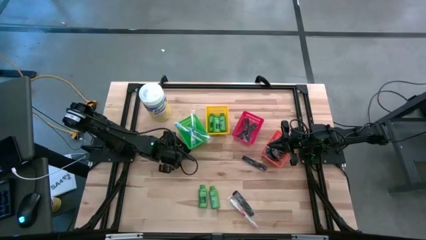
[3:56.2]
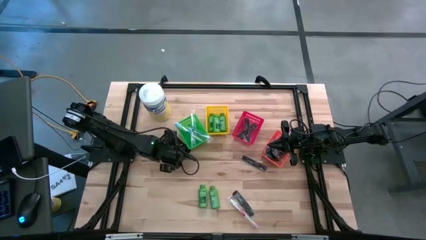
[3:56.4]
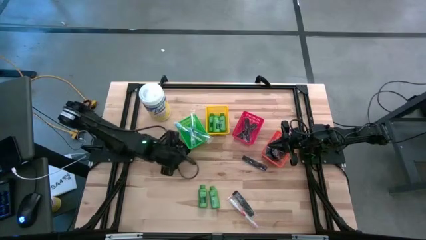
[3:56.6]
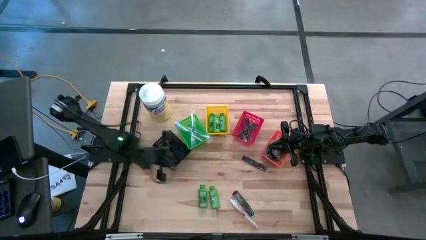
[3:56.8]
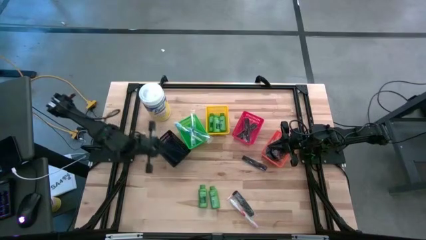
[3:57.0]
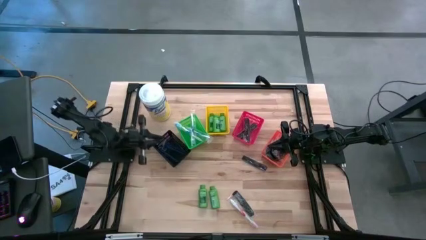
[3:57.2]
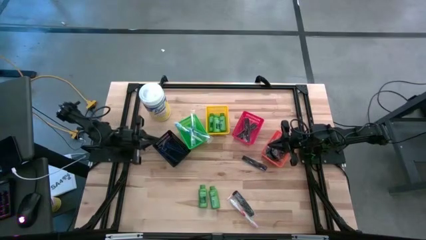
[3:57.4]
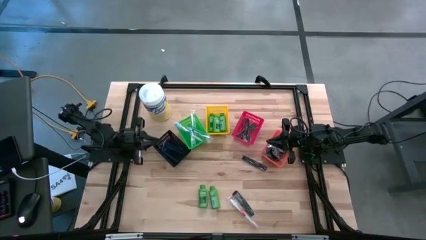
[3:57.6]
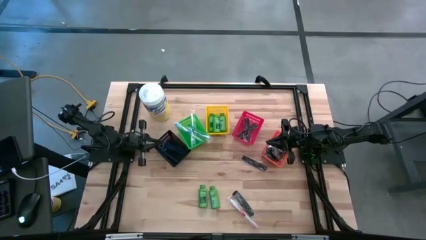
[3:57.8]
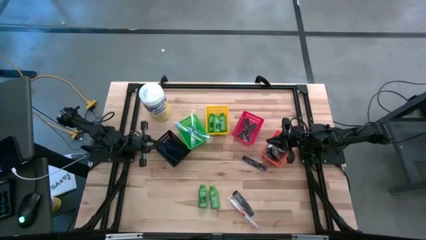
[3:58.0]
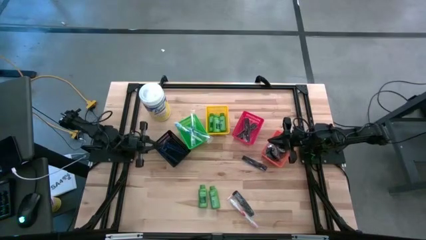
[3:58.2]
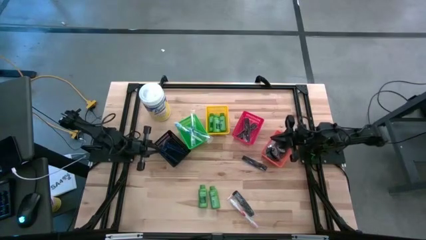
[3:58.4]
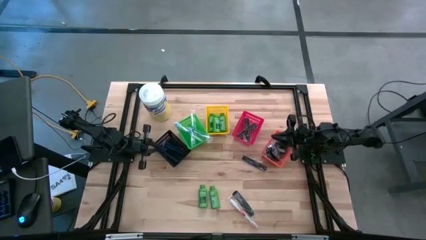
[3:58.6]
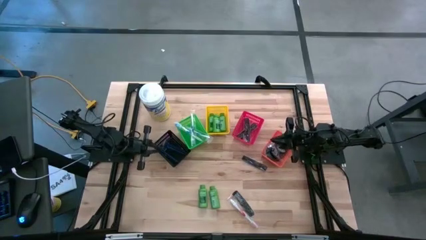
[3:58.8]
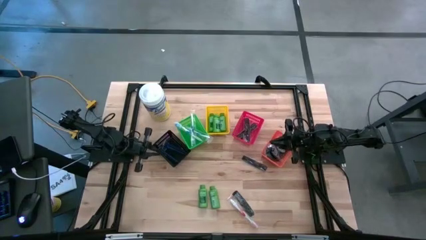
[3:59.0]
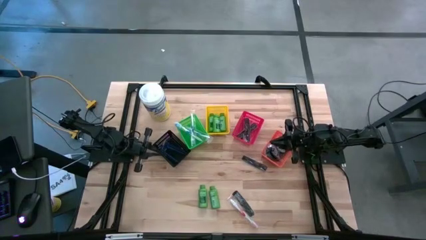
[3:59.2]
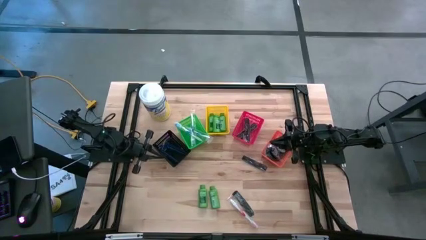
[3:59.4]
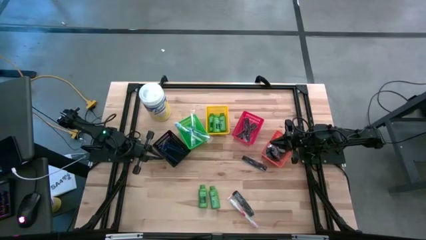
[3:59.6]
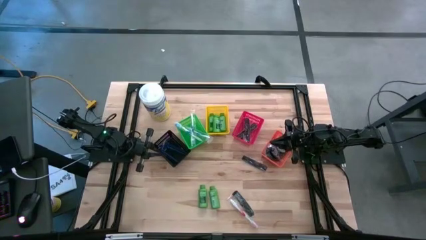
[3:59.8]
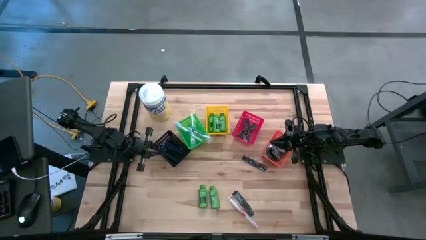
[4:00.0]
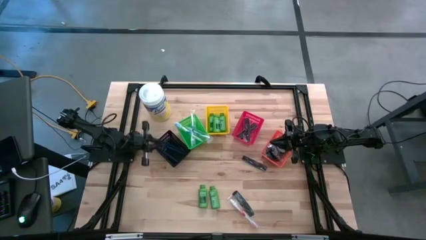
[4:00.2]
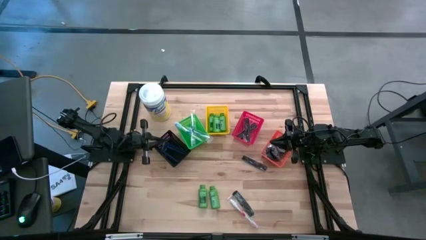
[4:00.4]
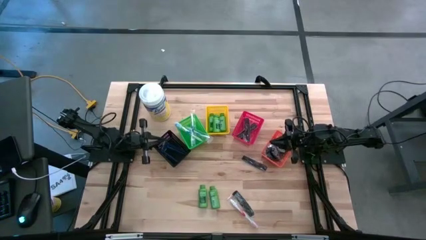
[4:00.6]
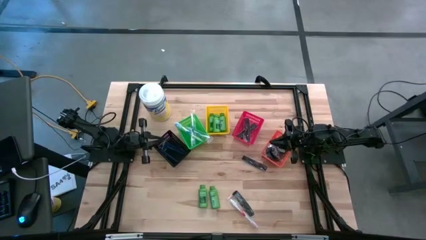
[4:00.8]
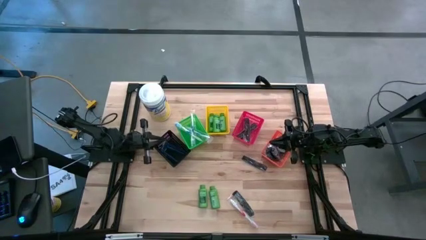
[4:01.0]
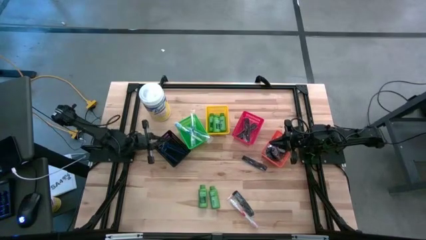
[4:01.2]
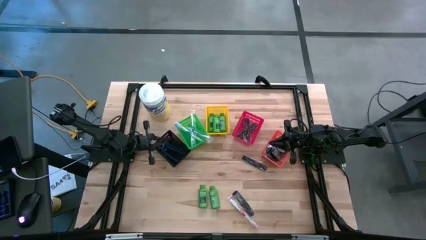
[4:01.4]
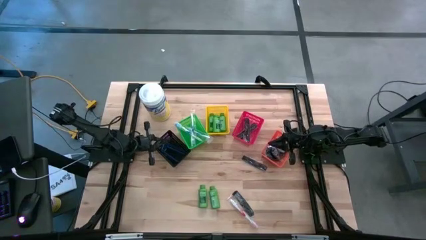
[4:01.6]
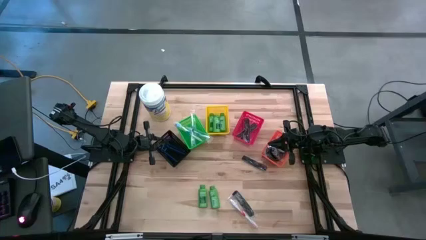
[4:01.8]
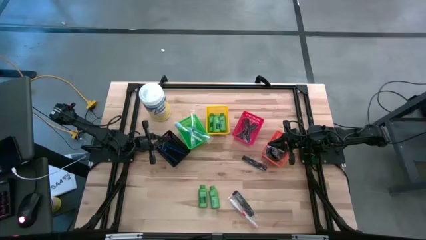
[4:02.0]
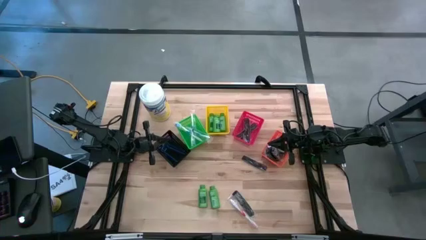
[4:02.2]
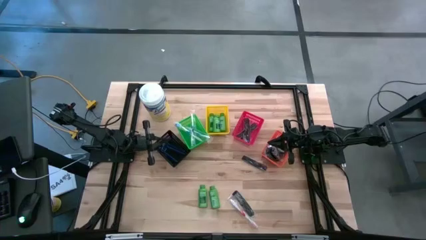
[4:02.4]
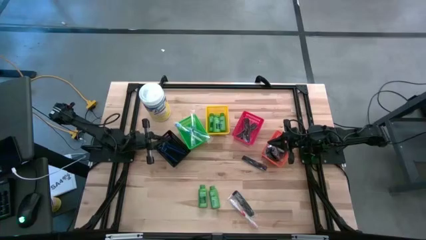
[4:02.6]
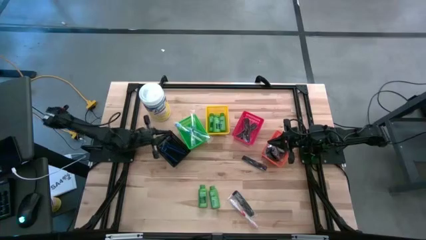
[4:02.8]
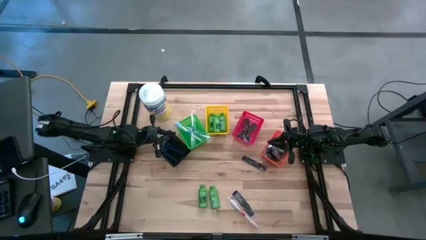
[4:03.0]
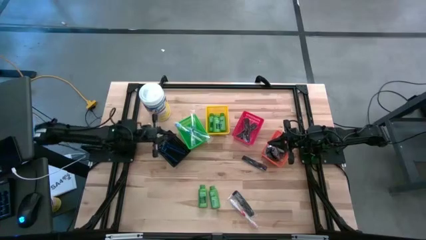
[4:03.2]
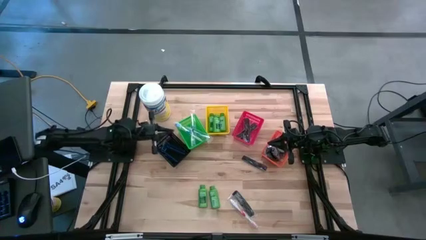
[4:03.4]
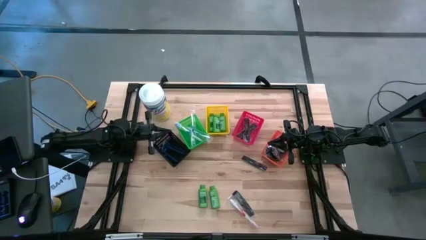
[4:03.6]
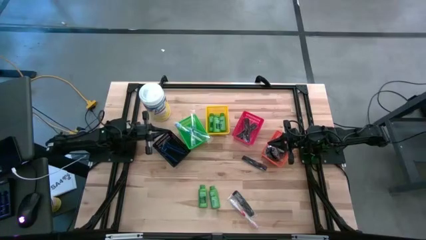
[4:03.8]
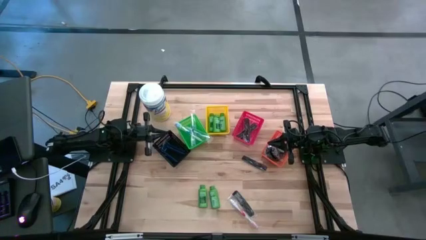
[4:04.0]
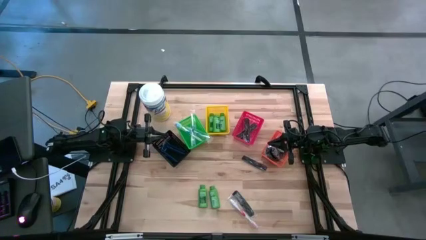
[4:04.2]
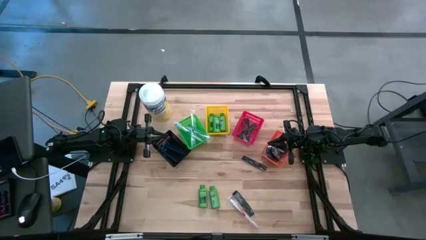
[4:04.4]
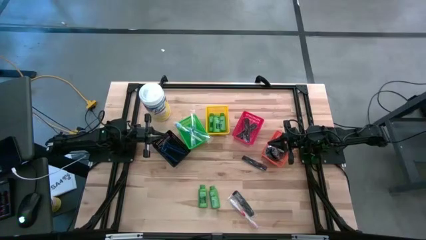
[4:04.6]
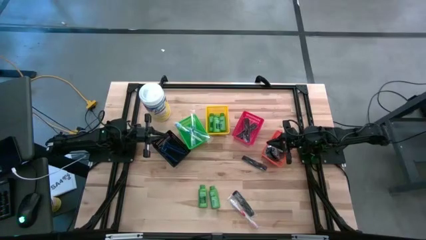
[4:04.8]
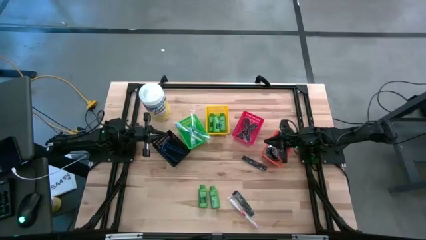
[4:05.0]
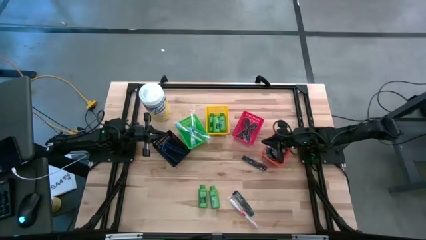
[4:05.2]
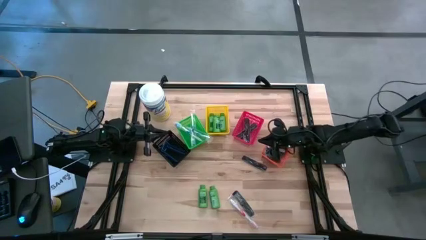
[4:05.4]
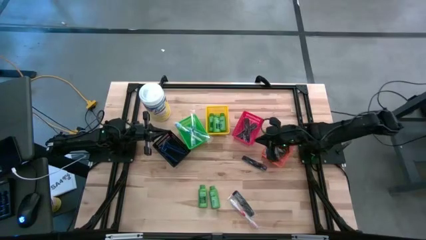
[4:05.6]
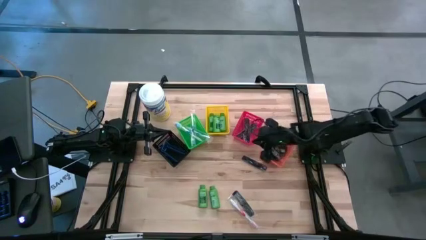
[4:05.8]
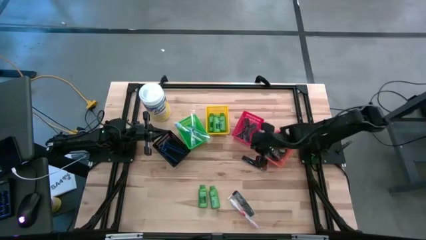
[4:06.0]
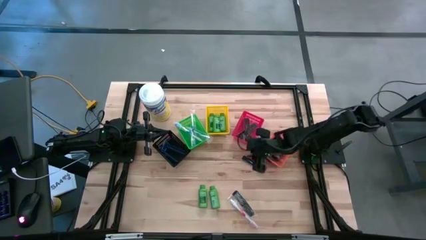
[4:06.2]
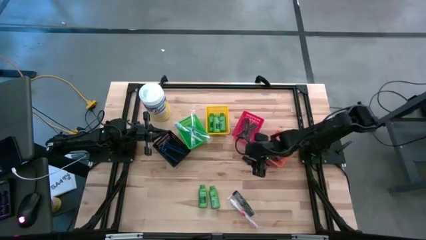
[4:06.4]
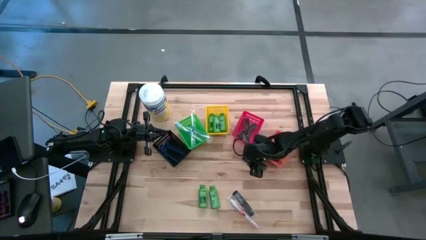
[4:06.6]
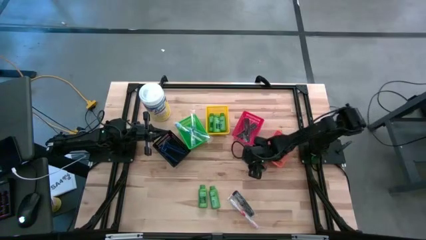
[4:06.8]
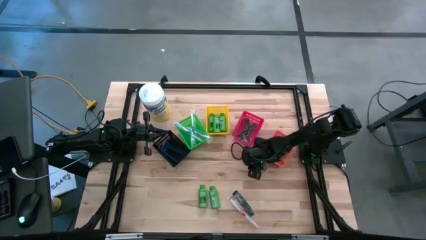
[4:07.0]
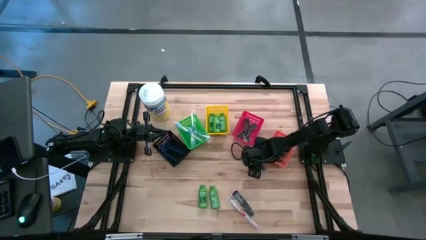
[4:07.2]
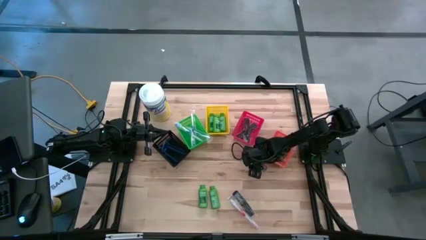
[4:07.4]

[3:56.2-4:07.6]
Task: Pick & Place Travel size toiletries
Put the black hair comb into the red bin
